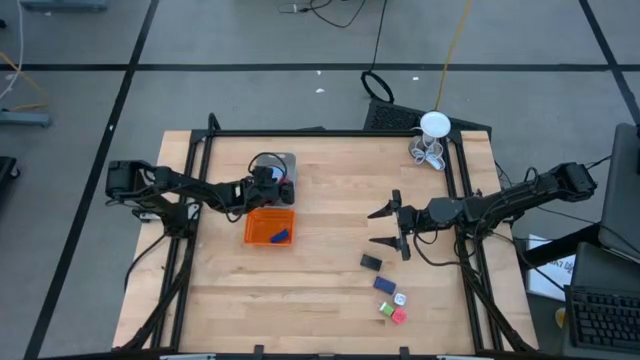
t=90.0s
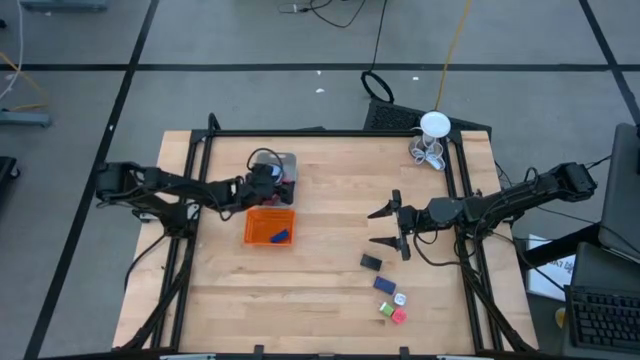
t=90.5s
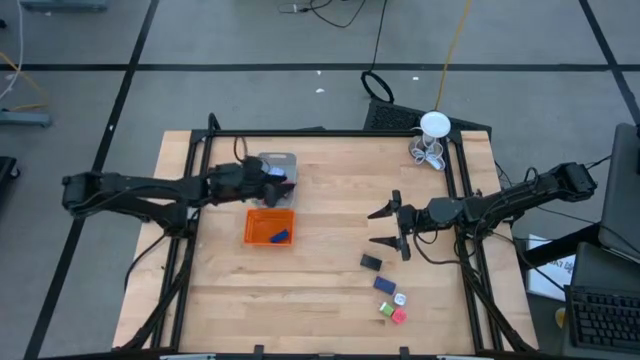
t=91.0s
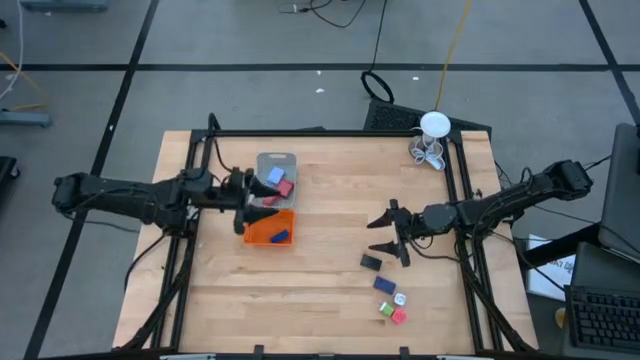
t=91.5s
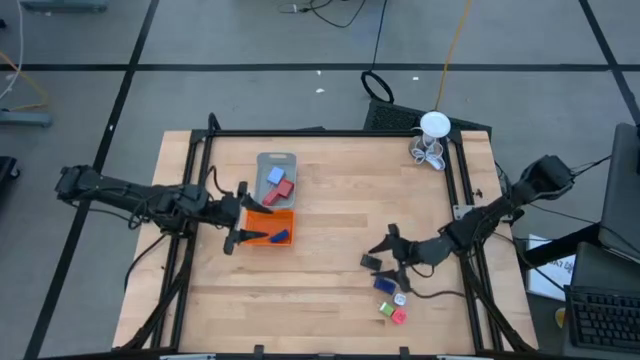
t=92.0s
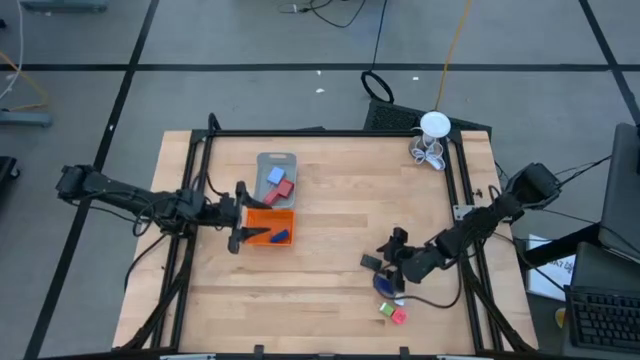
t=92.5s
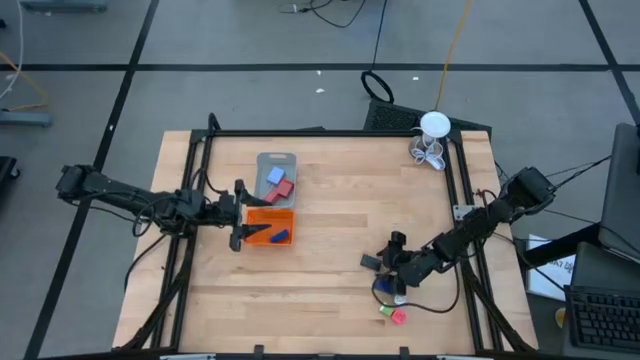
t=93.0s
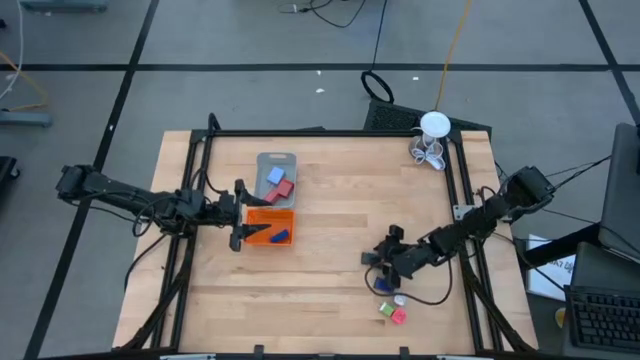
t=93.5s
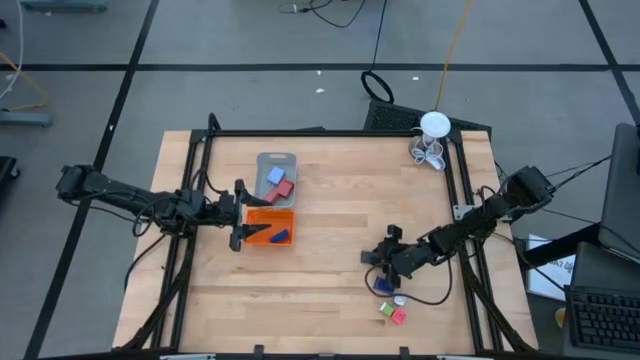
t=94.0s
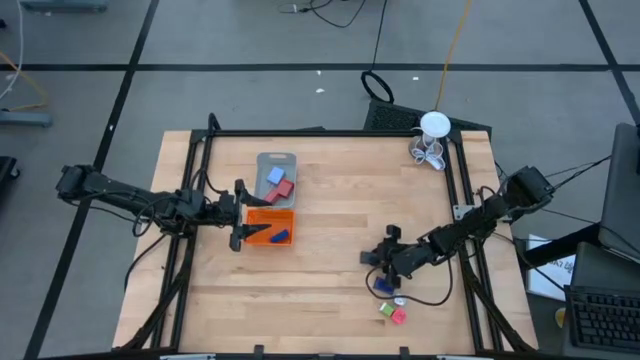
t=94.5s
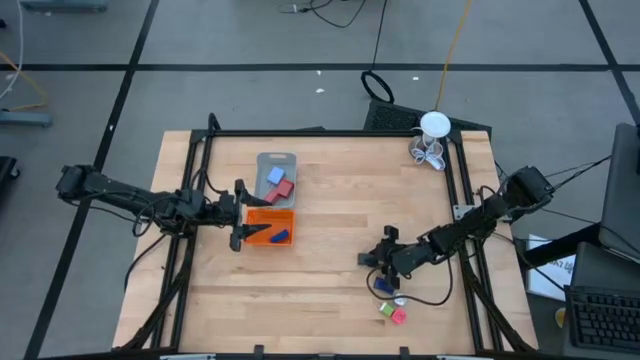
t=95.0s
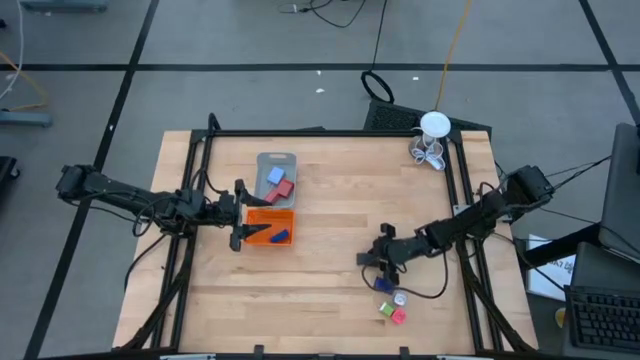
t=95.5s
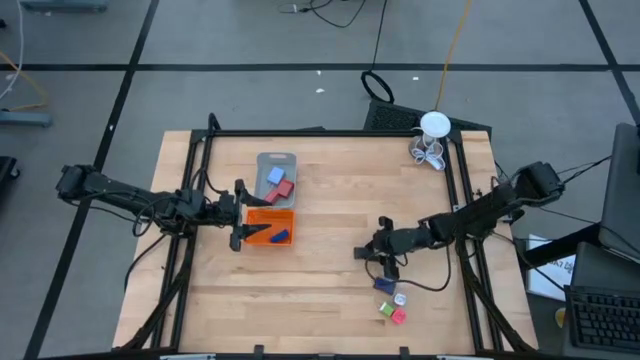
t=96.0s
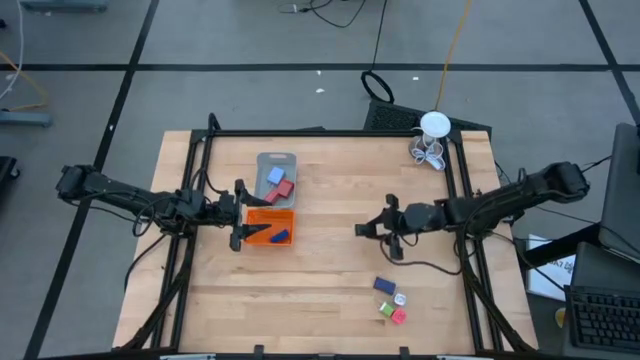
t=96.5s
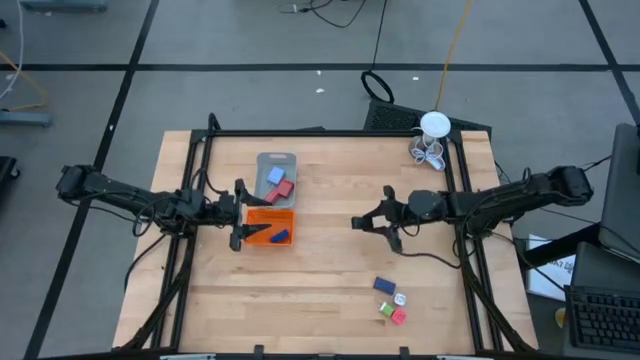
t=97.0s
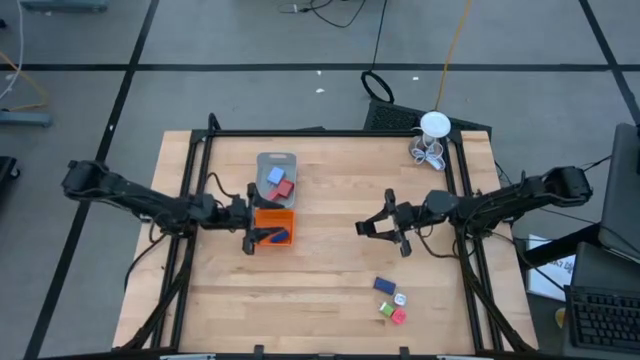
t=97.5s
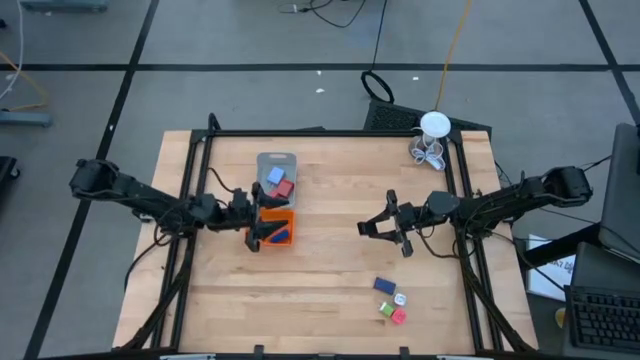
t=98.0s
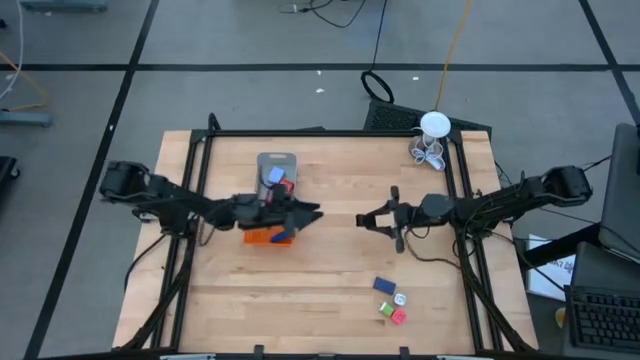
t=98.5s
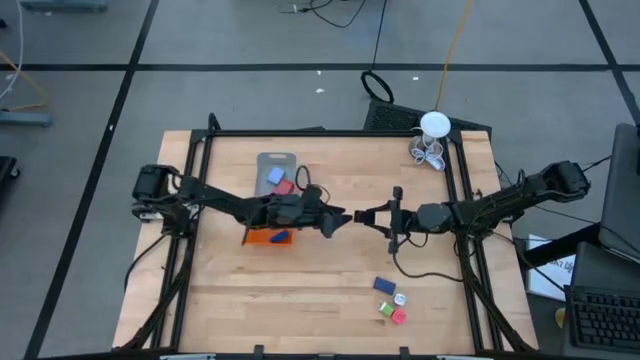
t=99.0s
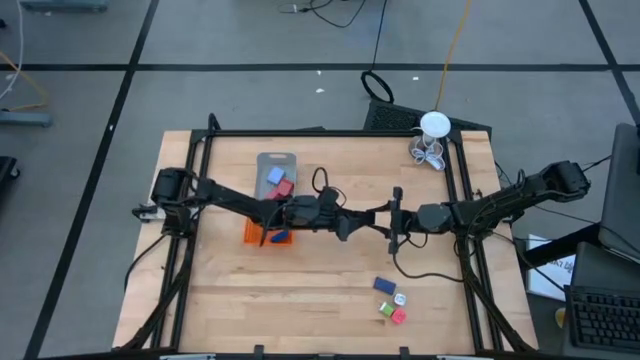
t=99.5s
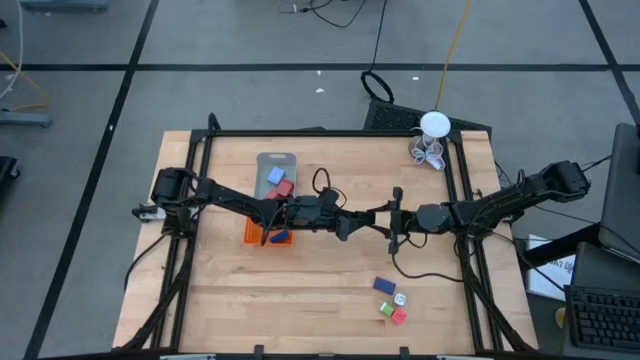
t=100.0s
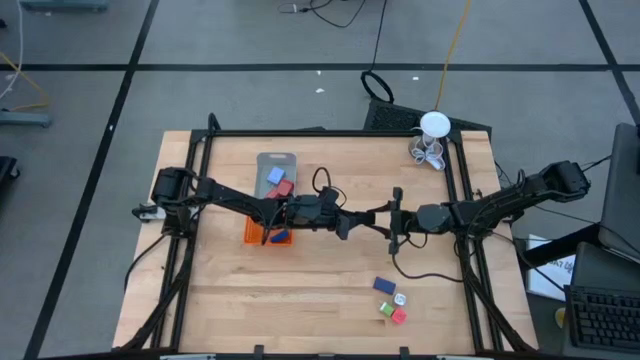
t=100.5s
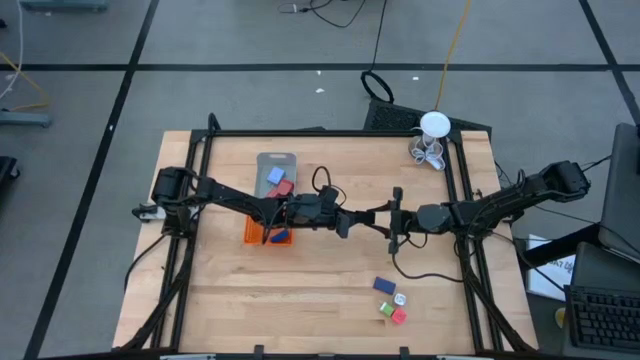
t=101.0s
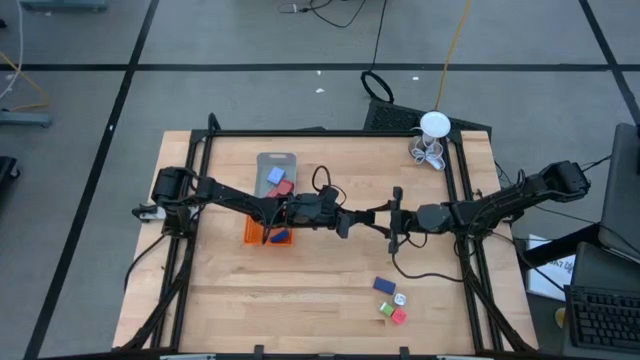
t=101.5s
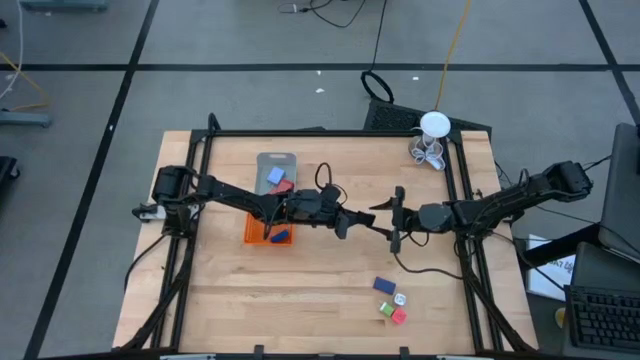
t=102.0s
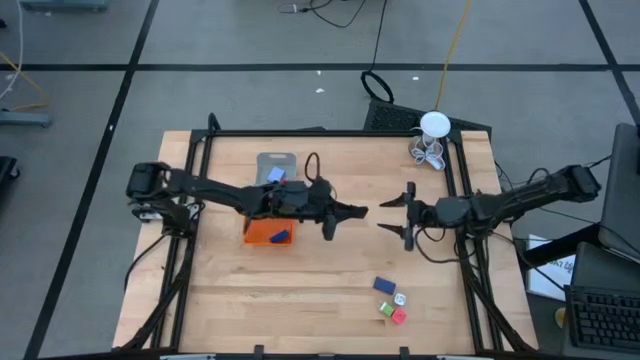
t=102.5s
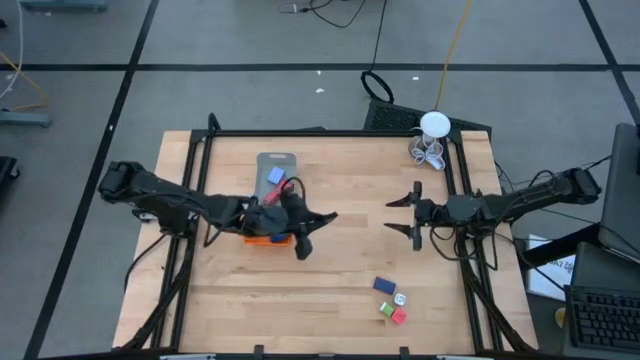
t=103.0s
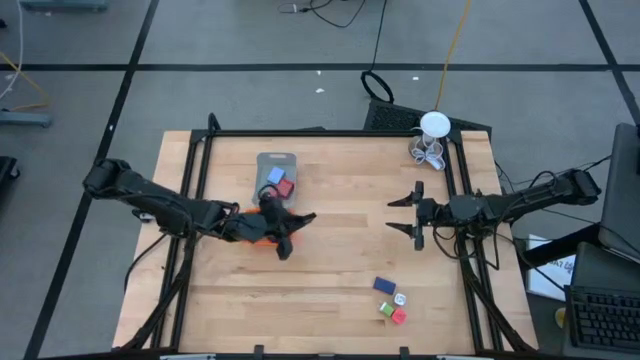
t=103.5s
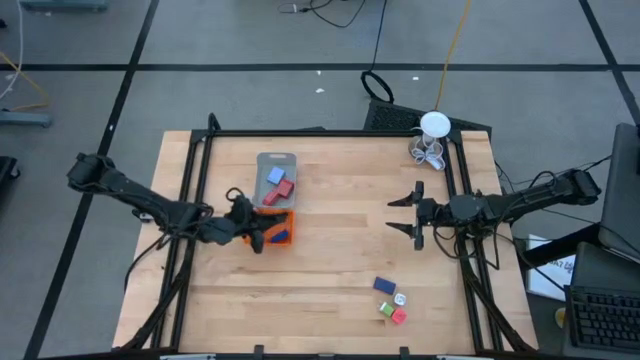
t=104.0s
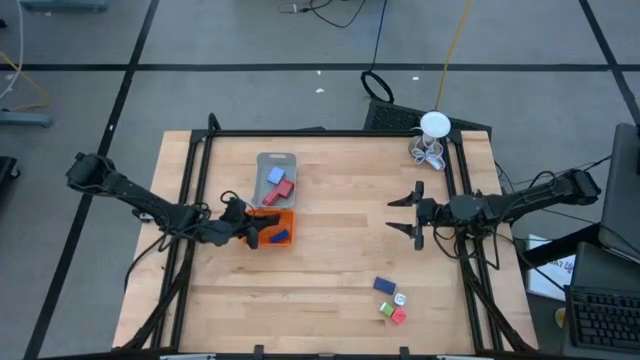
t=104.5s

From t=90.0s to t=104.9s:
Task: Pick & Place Office items
Put the black digital timer into the orange bin
